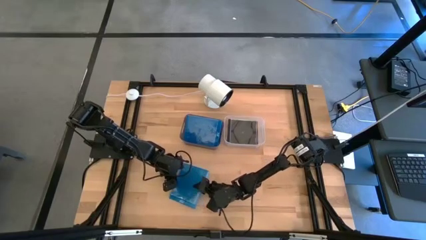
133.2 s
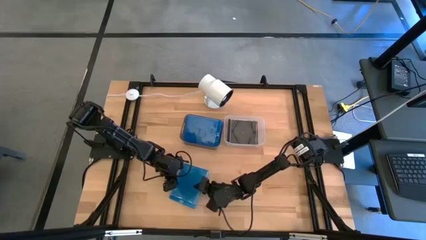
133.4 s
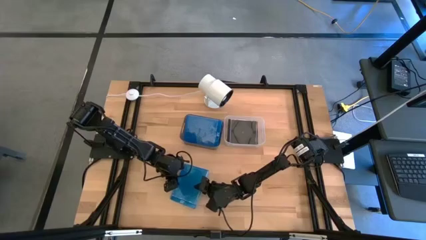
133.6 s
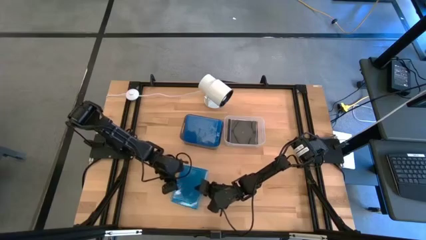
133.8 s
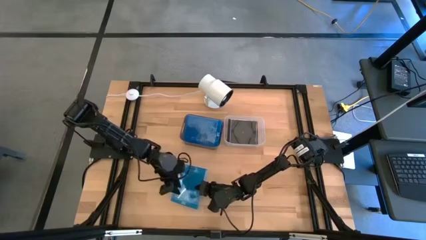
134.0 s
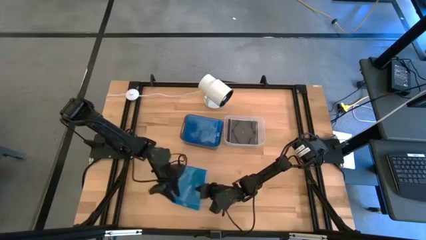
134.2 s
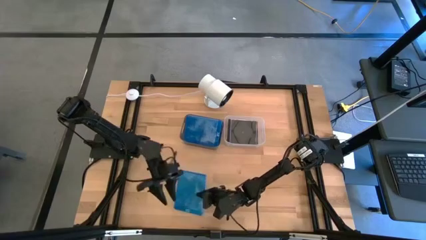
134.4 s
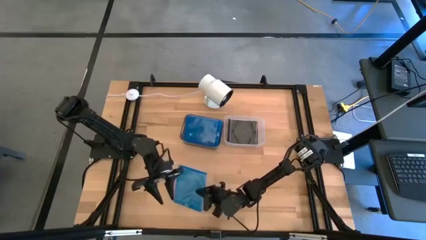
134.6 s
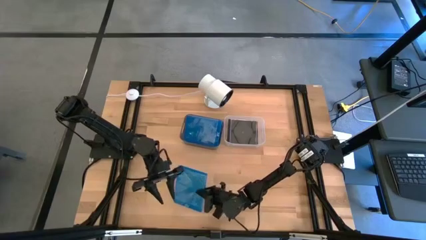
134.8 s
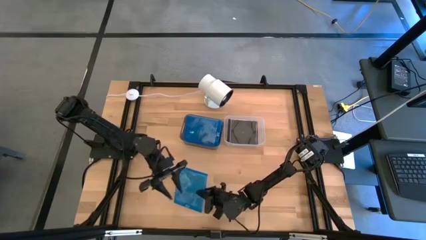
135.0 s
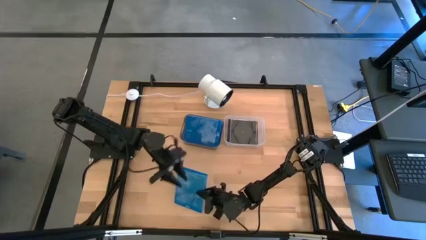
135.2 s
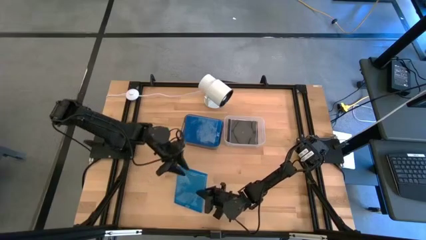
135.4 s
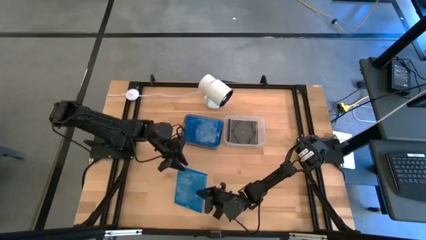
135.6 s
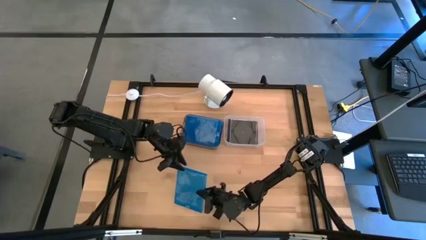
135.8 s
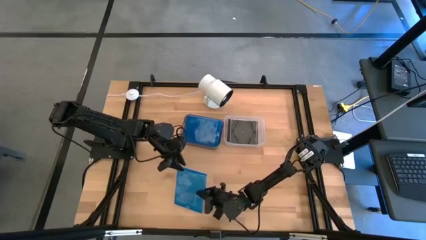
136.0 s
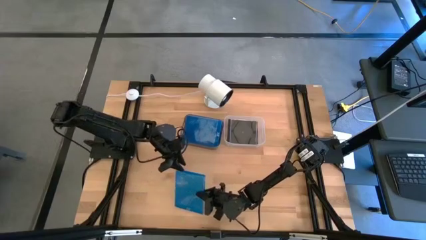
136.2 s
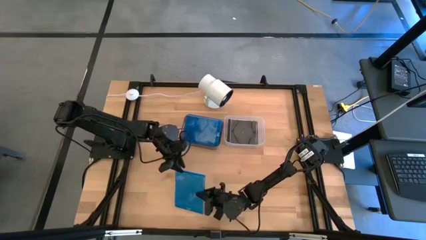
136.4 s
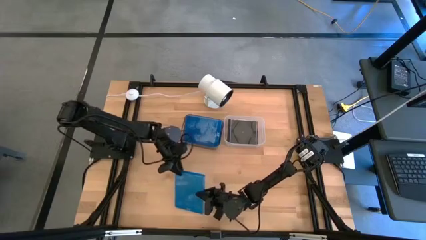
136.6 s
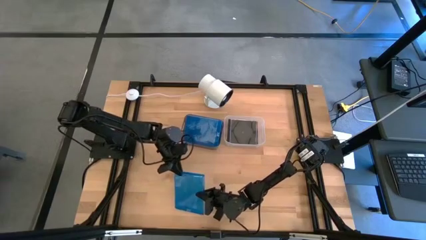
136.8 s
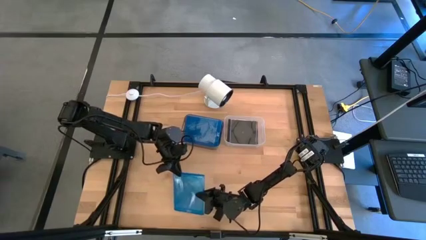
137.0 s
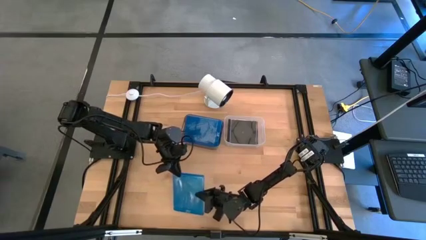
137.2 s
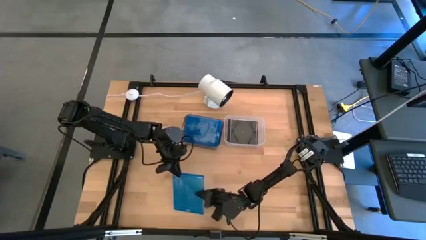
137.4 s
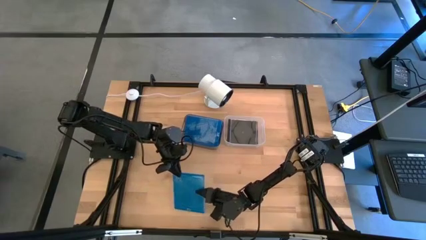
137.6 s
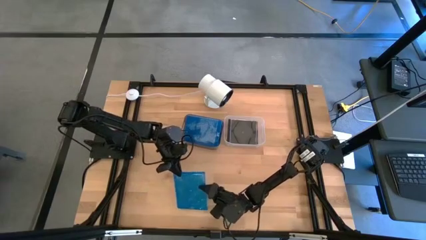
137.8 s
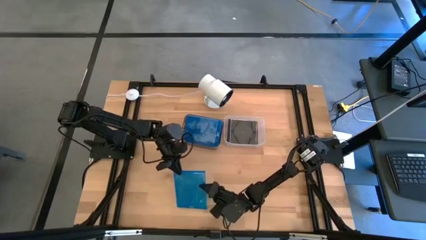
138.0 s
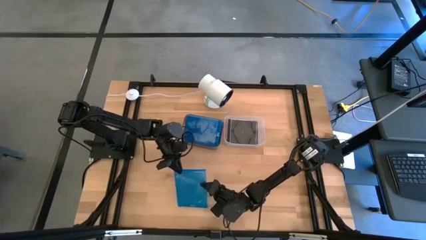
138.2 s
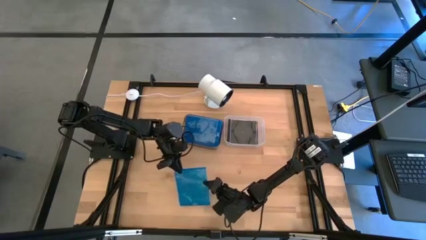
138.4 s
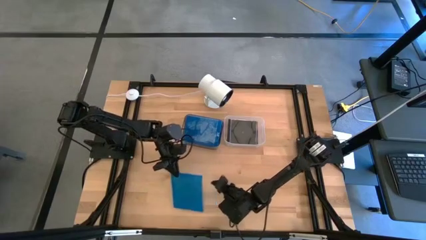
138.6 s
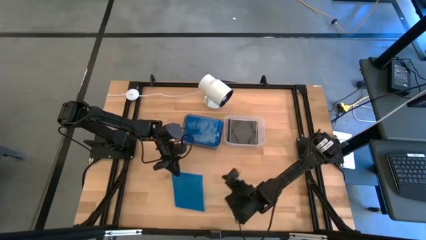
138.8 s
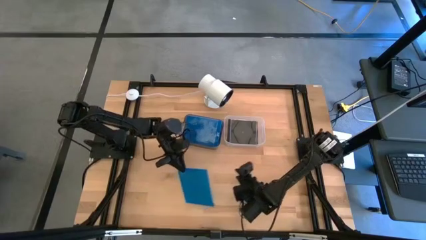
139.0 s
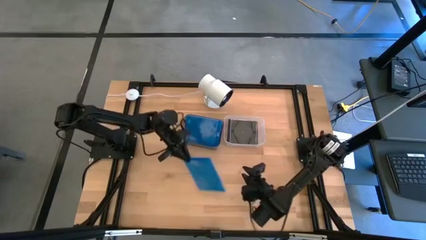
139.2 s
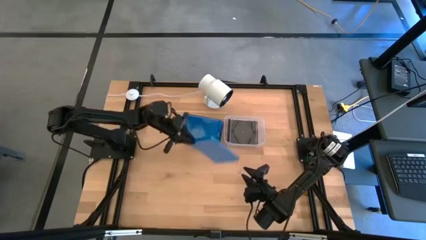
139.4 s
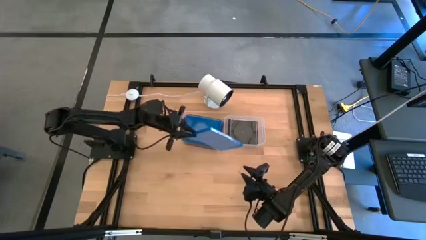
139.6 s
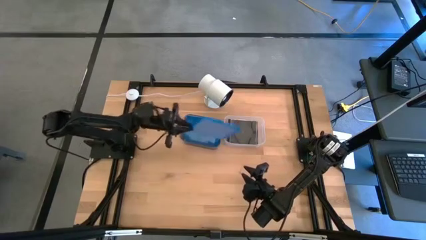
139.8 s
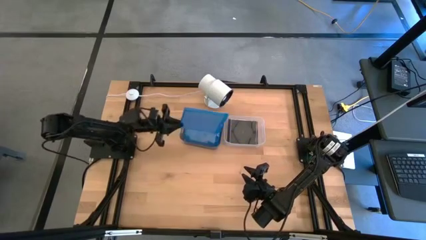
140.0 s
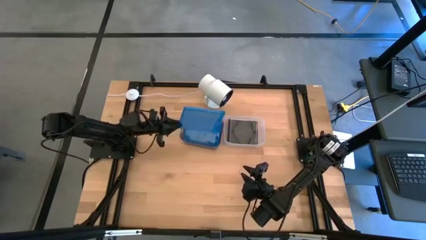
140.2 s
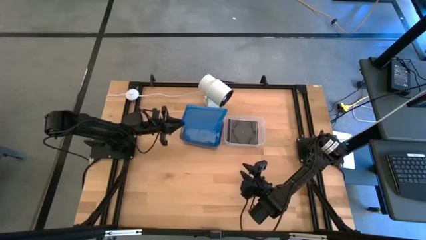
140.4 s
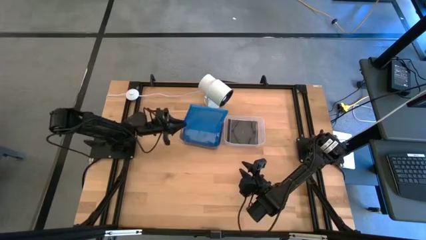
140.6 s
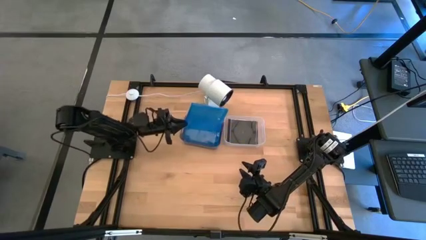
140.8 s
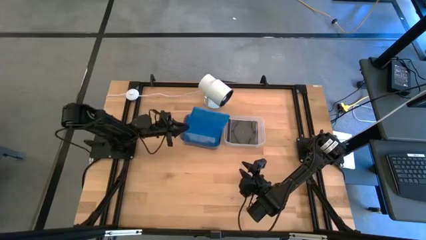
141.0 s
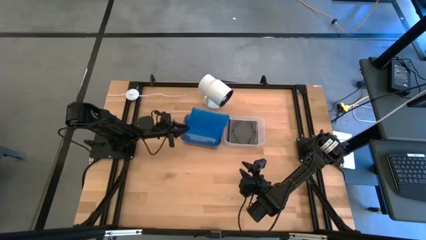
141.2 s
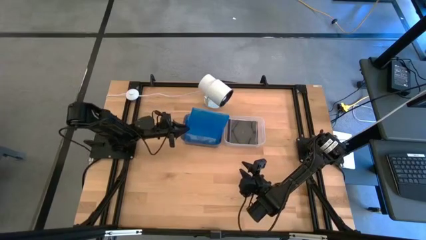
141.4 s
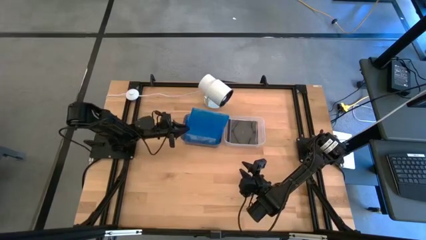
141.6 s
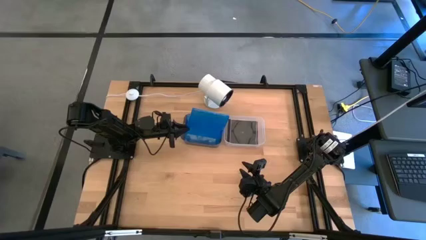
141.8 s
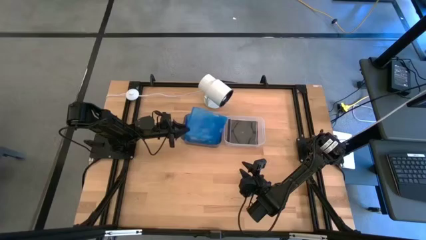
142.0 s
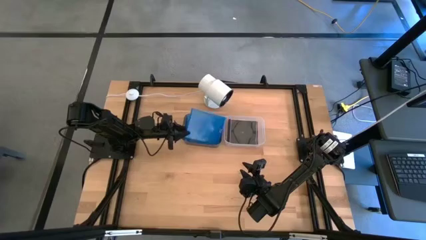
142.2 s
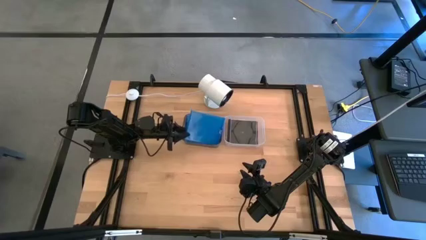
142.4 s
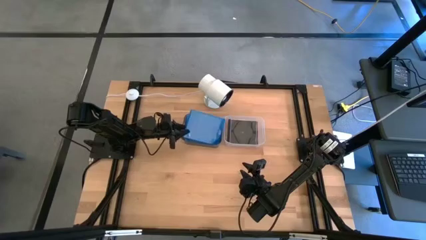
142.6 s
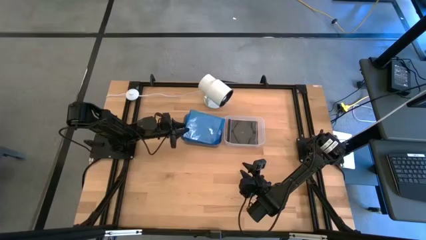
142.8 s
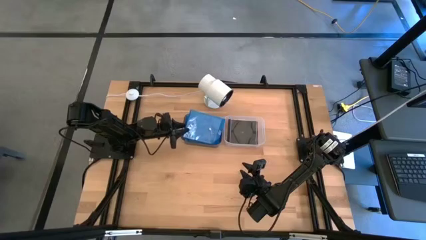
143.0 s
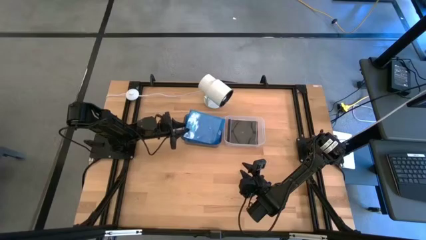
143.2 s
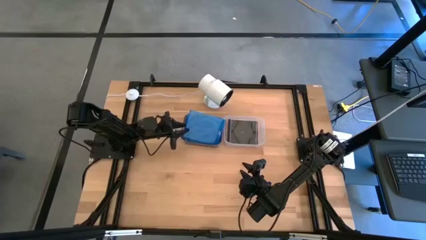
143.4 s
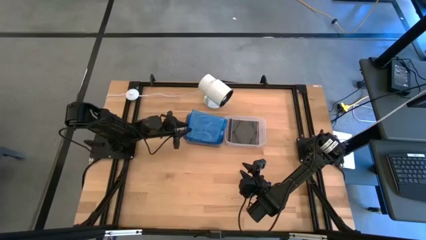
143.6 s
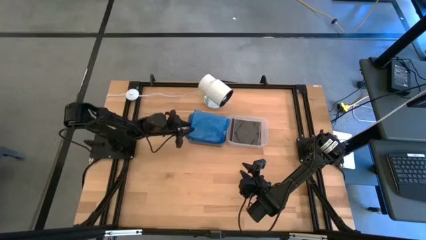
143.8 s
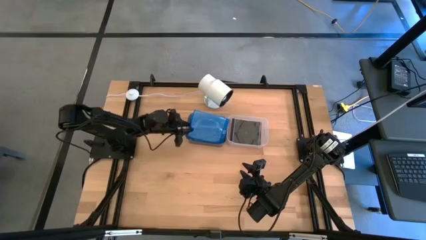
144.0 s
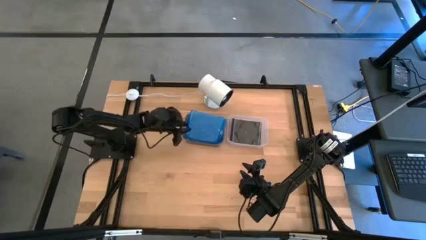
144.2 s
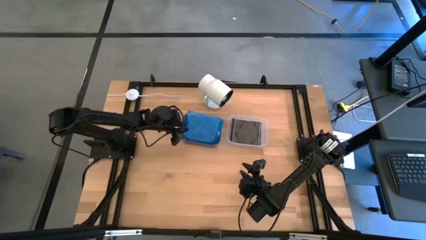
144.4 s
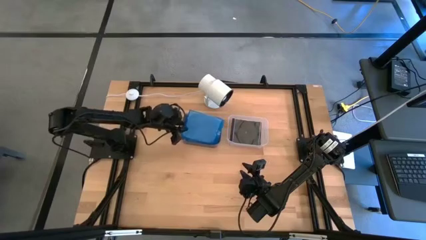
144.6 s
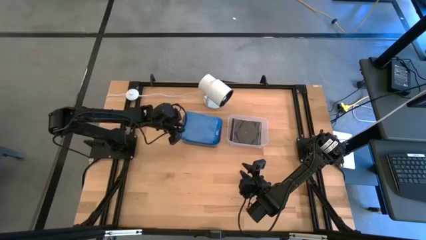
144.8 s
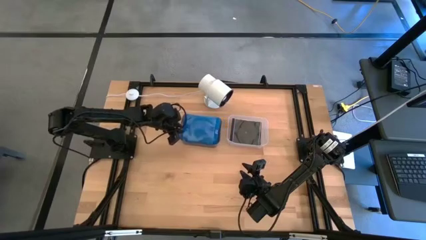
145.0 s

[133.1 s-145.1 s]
Task: Pick & place jewel cases by type
Put the blue cd case into the black bin

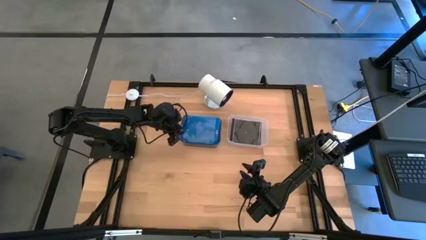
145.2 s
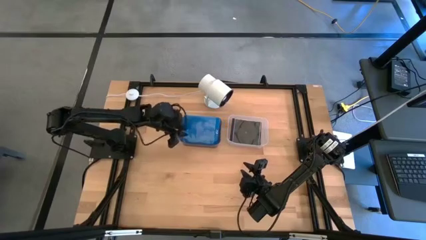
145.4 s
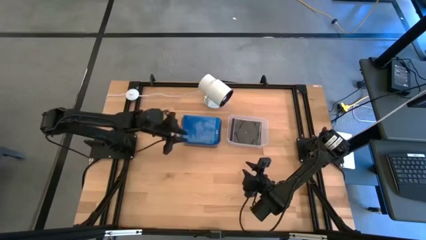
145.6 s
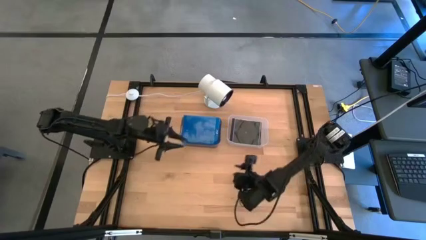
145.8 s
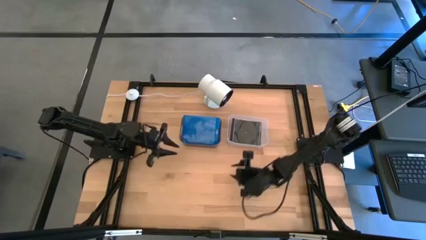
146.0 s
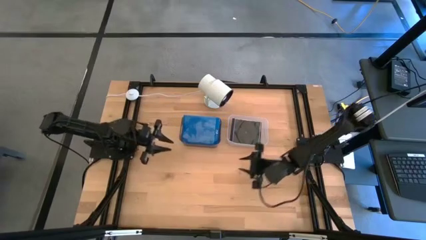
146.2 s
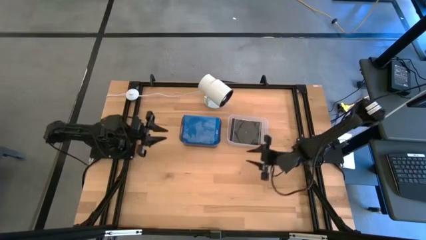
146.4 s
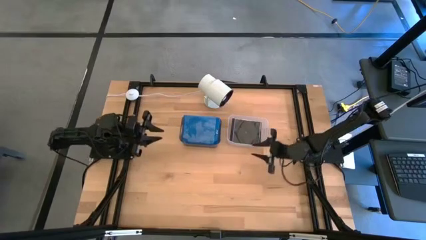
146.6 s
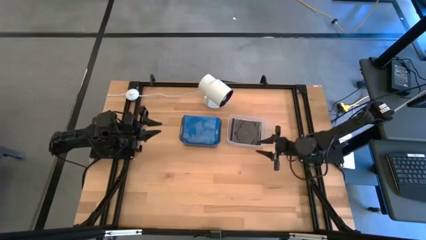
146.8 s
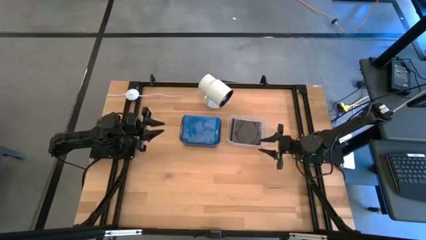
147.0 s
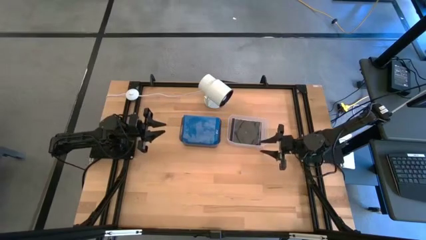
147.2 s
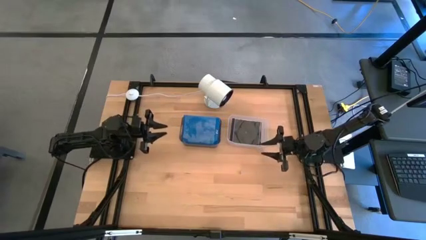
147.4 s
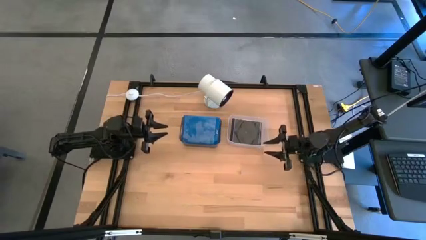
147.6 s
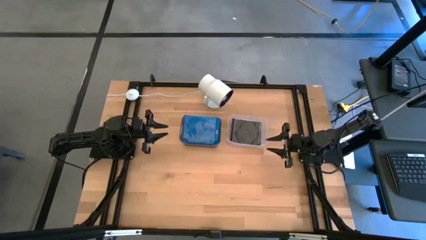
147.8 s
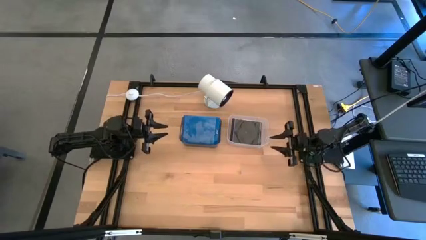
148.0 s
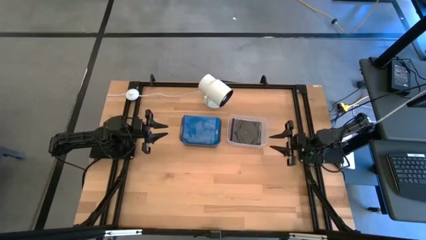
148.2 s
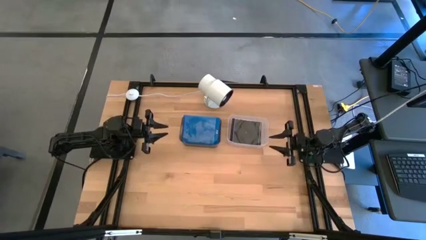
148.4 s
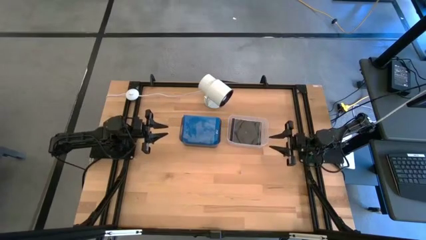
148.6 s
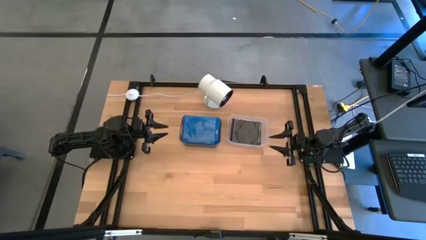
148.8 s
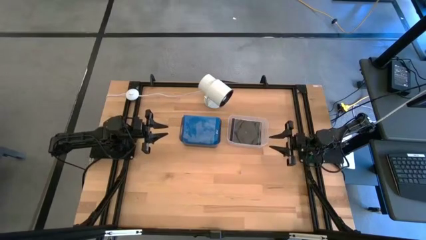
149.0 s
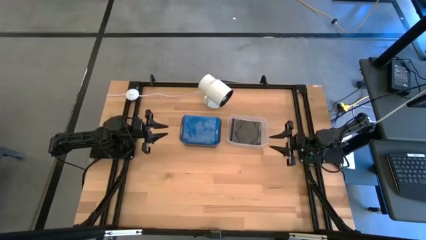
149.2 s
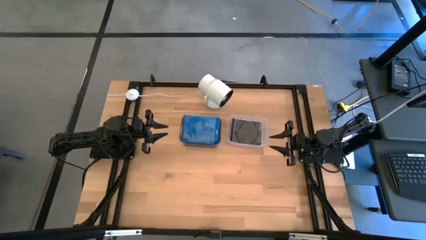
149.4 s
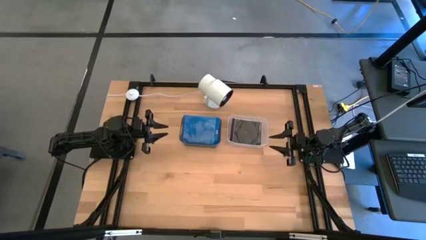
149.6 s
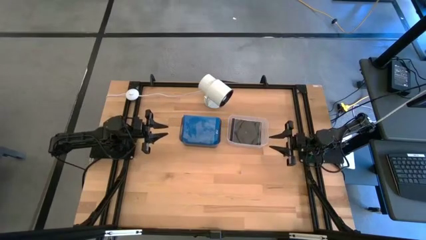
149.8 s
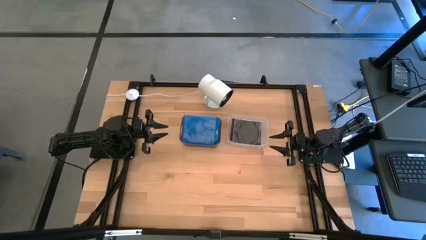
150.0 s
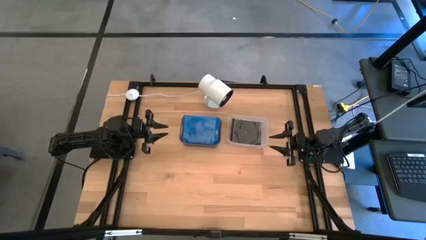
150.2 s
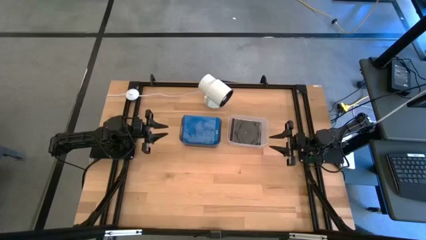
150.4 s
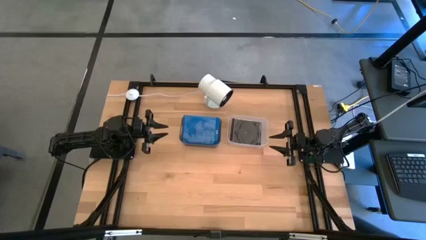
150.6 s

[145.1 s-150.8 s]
Return to Home Position
